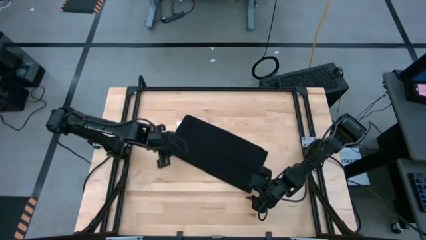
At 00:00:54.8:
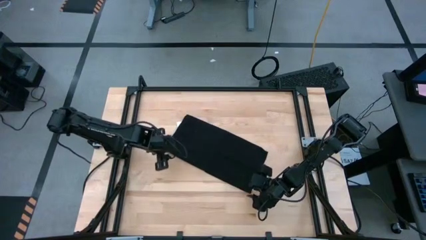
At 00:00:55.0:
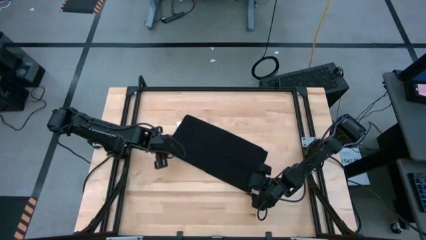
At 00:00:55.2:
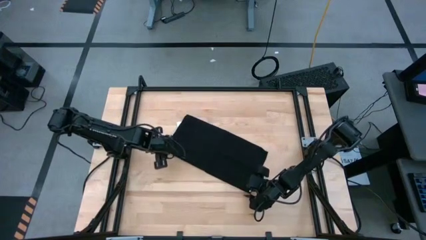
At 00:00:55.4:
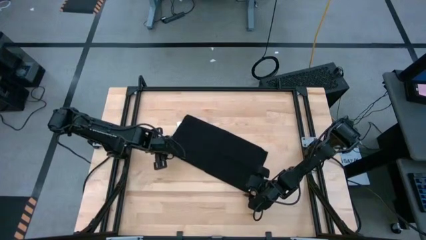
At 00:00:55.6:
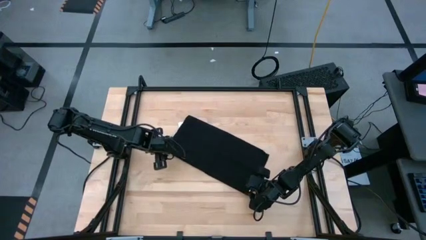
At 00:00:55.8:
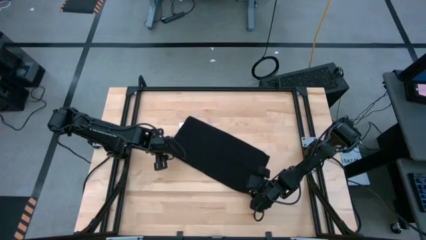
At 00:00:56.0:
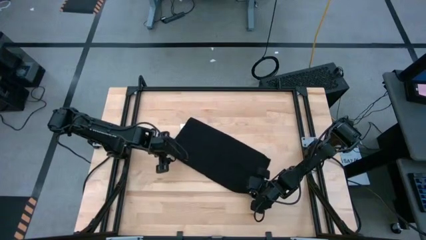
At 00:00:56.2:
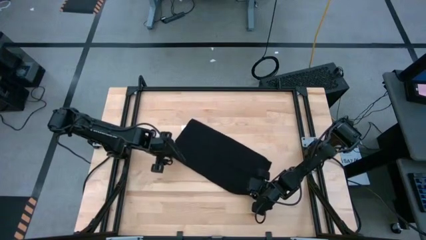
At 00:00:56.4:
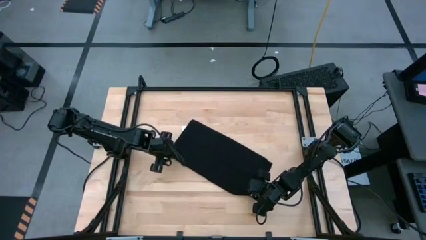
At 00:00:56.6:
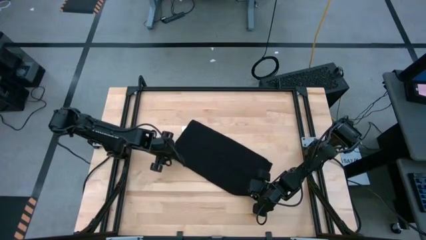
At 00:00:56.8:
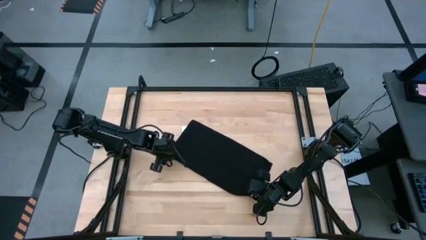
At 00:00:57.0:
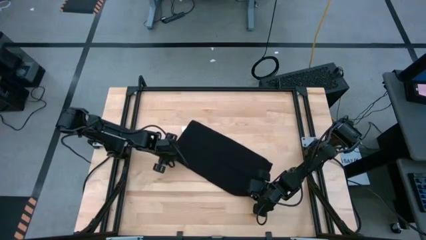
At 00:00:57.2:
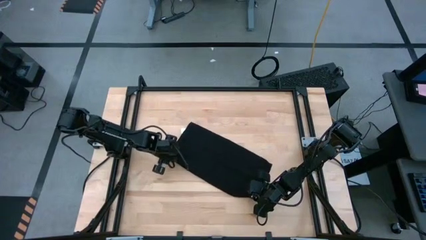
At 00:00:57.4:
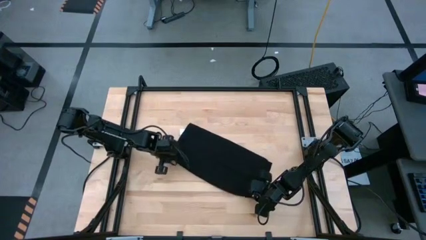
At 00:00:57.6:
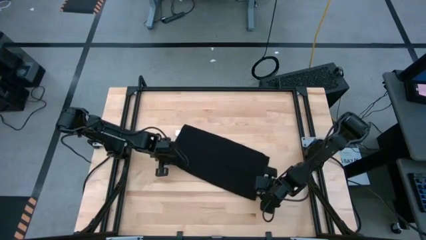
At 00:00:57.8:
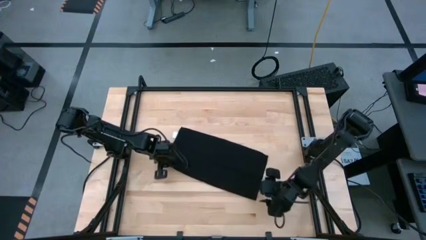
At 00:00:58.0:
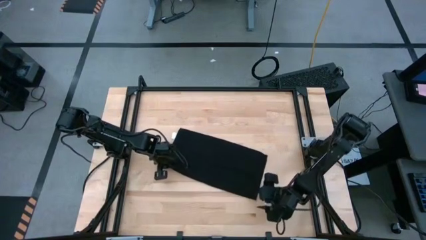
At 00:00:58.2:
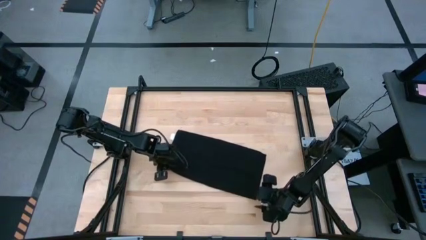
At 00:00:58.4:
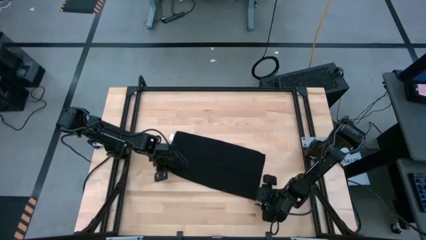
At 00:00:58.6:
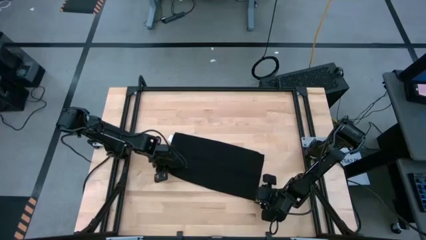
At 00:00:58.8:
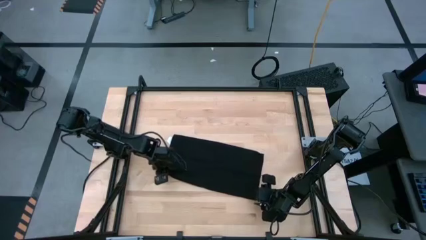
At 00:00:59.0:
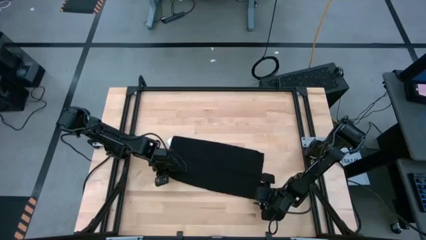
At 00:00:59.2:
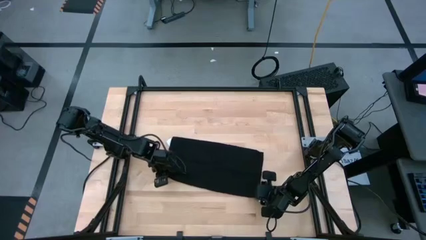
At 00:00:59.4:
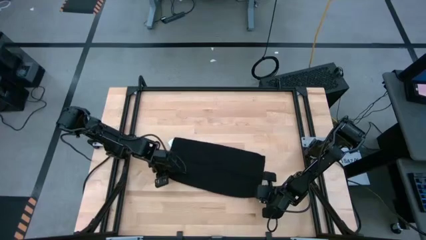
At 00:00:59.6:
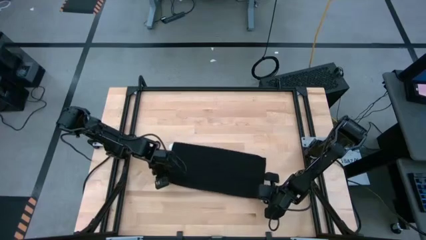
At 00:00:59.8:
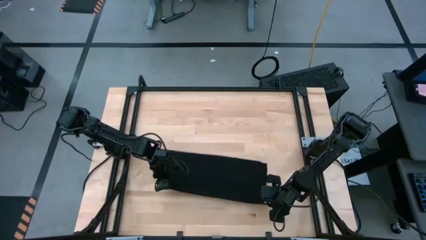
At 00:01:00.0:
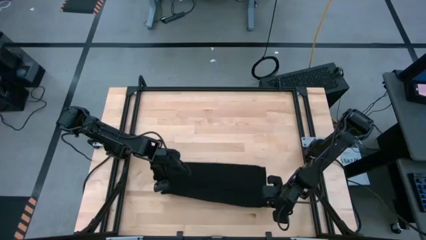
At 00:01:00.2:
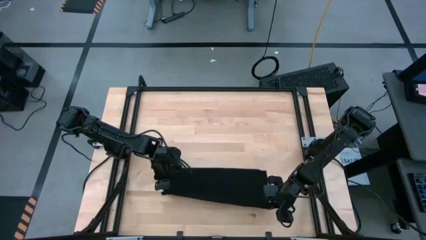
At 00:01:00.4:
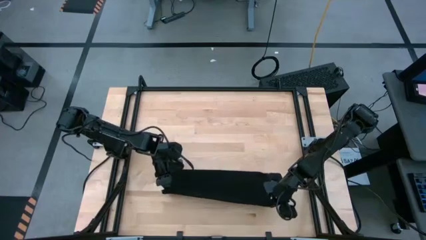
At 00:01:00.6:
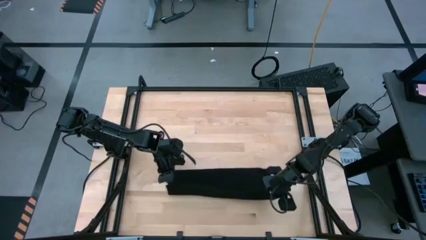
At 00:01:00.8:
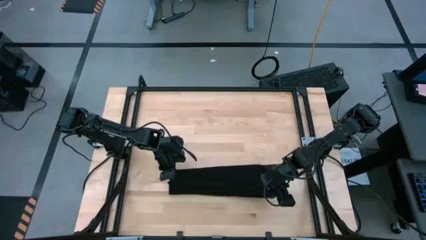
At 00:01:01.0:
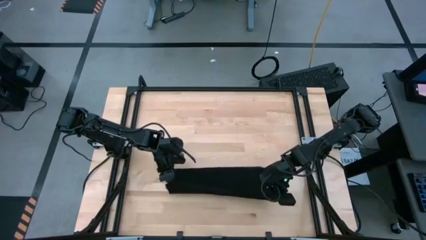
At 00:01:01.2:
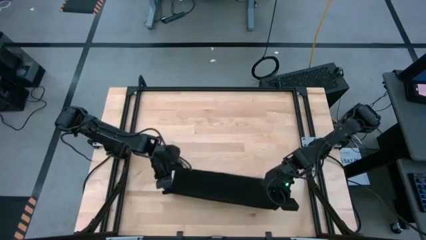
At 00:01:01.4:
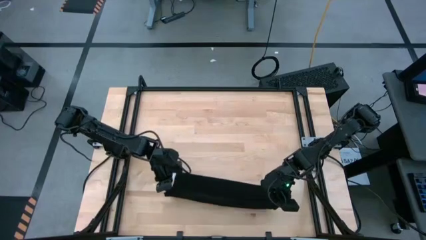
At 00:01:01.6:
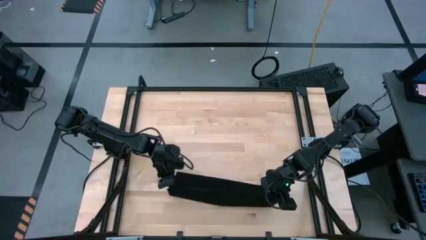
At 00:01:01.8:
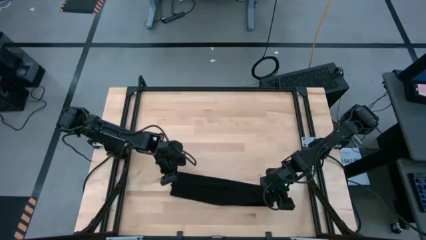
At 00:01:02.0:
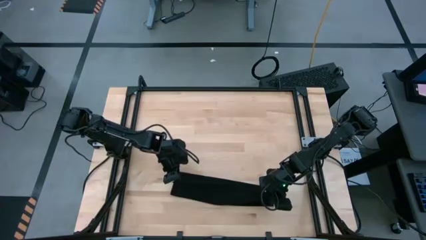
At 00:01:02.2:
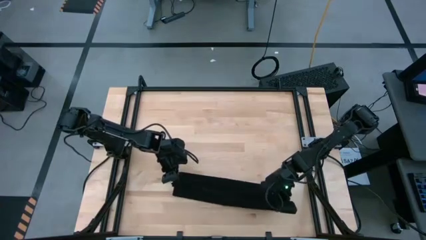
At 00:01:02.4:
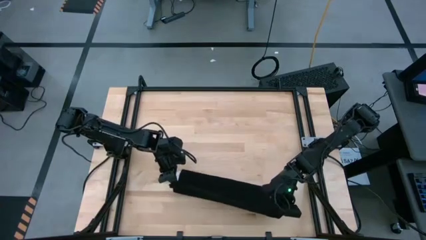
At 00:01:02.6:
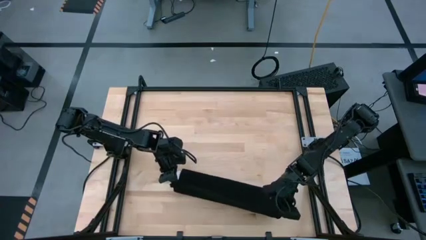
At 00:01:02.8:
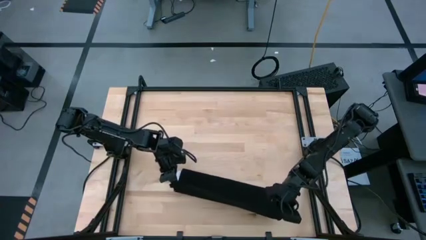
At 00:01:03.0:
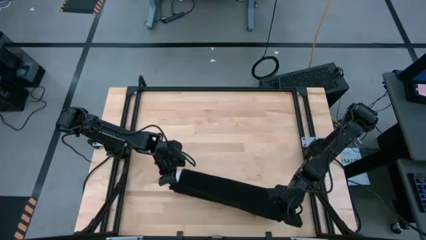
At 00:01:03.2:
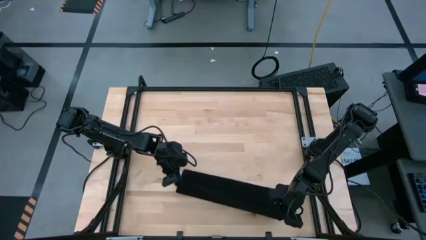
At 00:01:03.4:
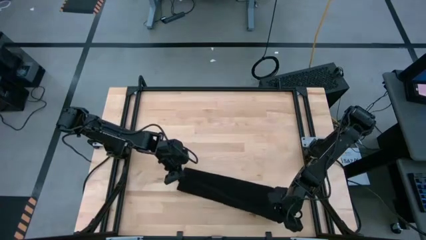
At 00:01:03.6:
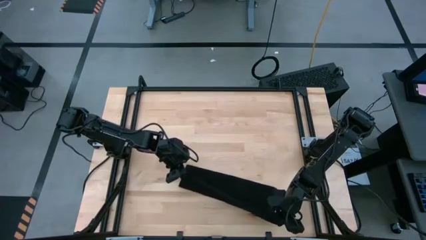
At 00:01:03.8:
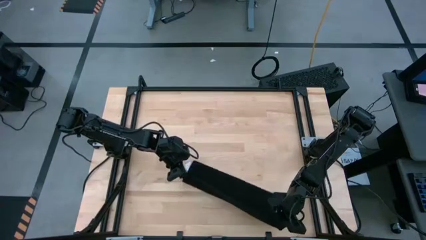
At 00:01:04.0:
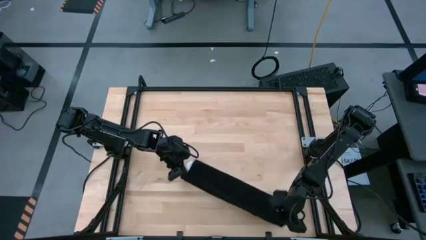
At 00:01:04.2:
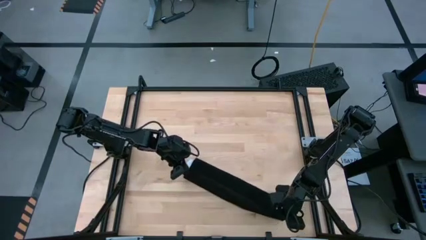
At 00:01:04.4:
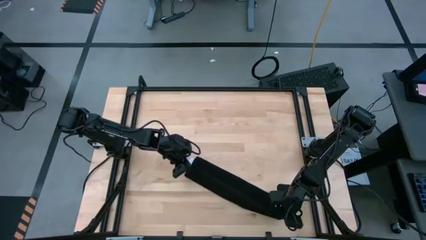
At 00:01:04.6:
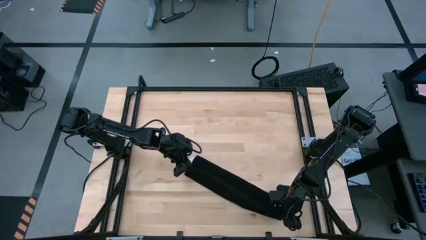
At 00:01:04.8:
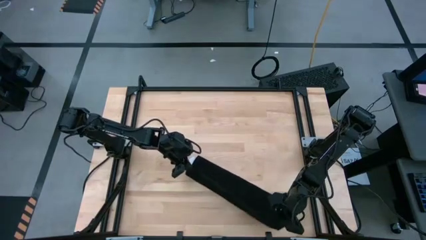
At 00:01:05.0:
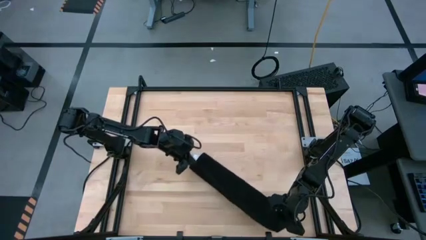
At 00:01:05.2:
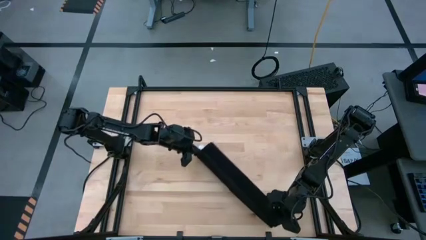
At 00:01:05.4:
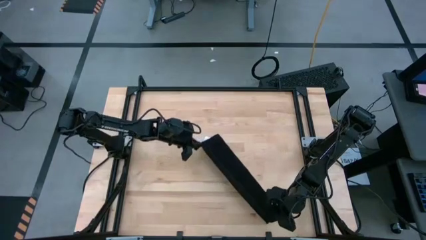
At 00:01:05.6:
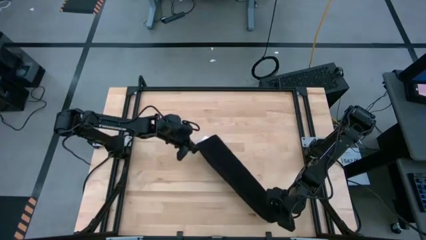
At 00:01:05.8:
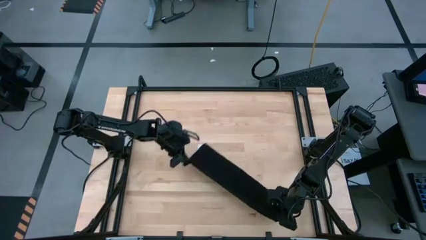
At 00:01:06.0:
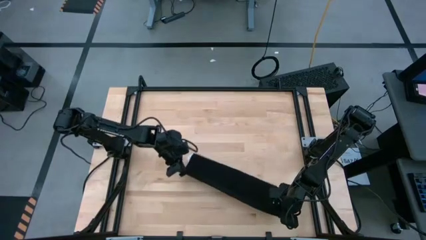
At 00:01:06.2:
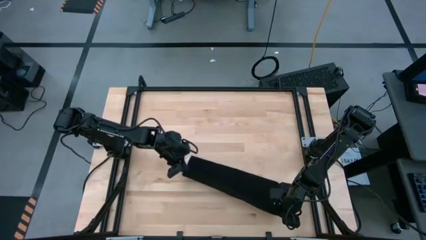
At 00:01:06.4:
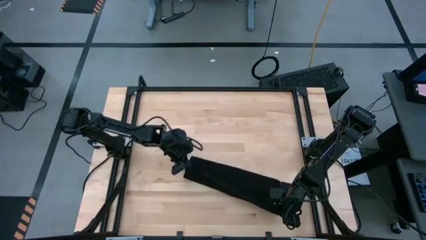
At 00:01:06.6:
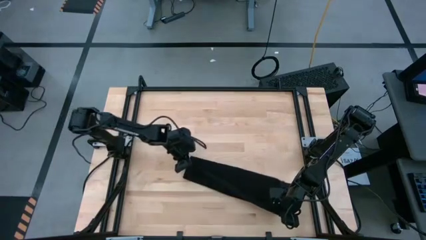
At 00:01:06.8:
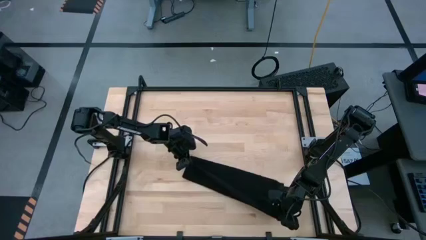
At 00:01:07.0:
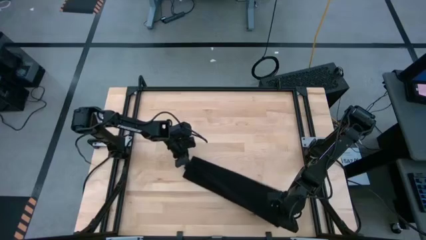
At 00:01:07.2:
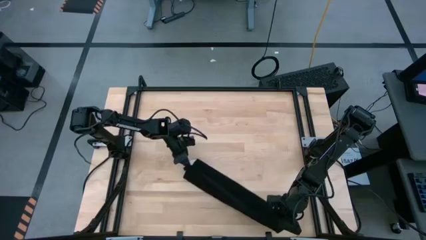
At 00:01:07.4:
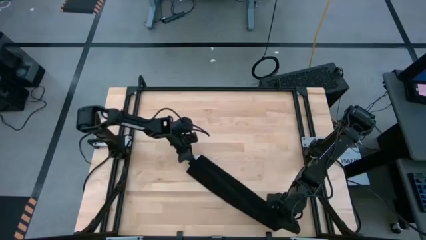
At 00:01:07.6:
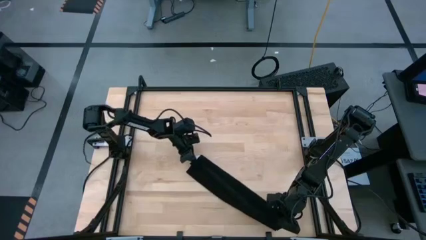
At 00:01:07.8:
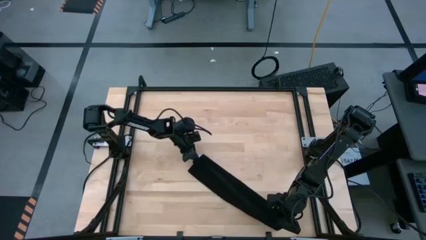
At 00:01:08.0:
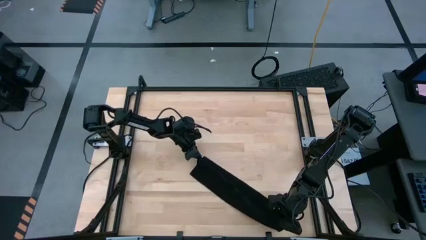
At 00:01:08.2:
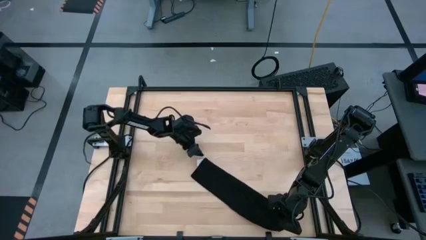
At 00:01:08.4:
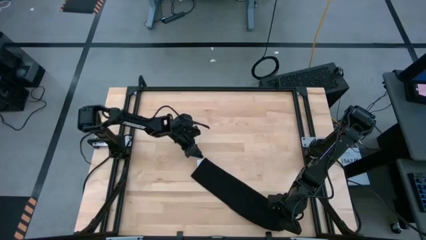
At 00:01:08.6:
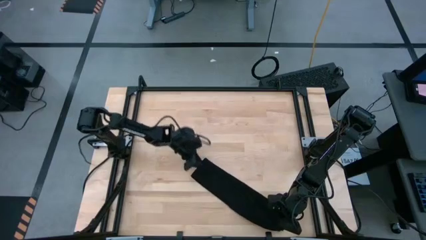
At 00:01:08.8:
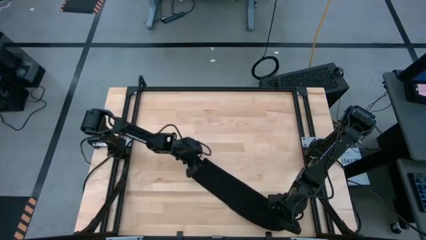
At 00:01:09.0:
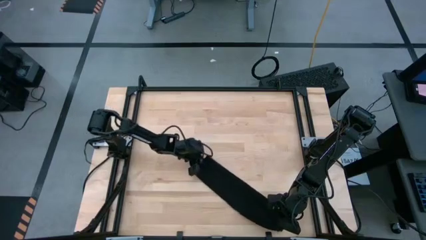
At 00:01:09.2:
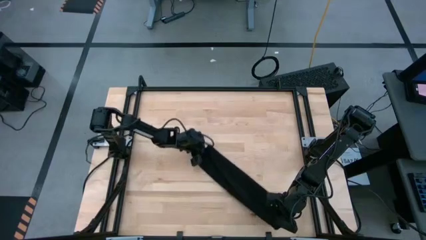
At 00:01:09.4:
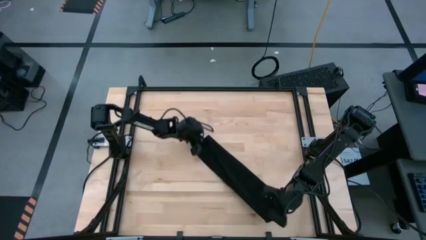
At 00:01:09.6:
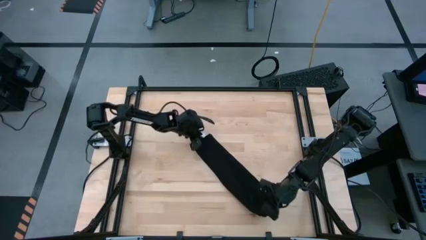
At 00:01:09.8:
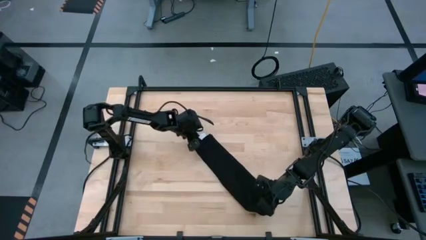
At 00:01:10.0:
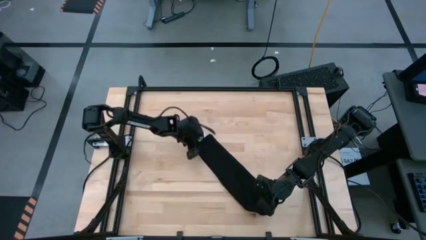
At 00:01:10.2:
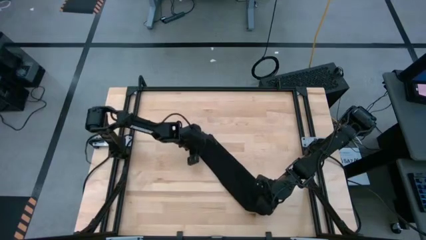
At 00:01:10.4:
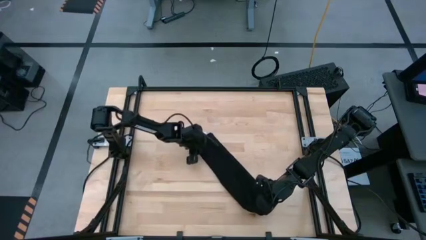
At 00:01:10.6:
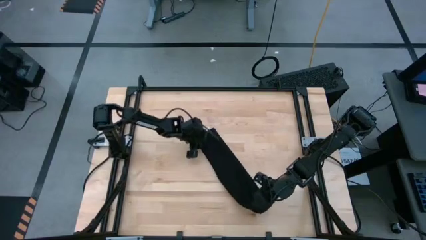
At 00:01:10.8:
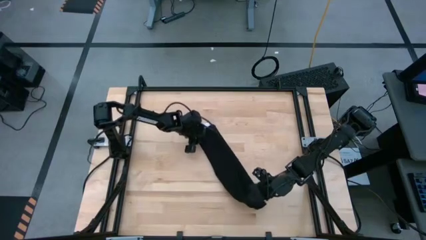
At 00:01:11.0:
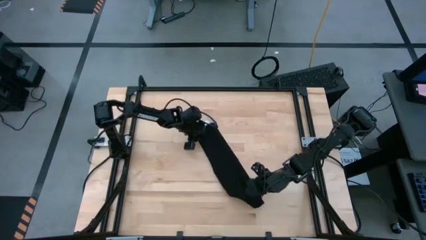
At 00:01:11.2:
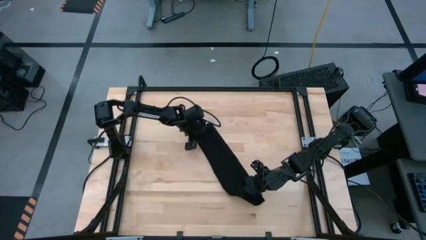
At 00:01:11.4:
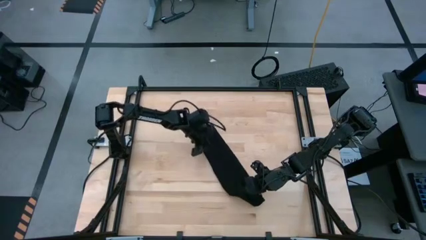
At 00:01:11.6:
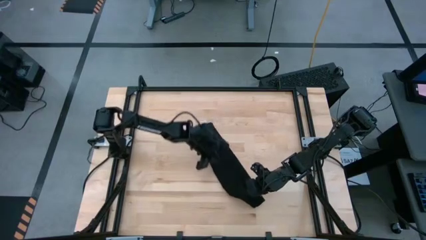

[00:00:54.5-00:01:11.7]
Task: Roll napkin
Fold the black napkin
